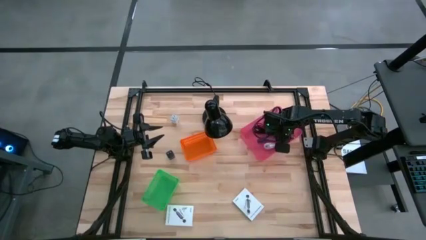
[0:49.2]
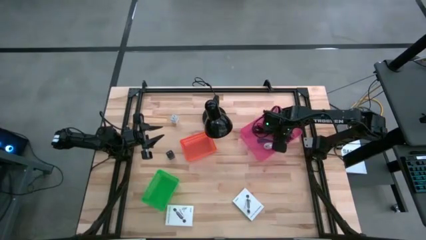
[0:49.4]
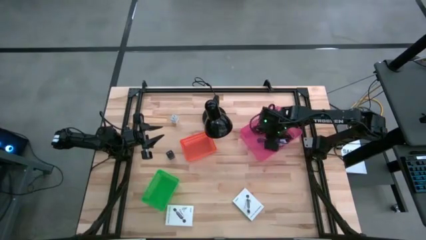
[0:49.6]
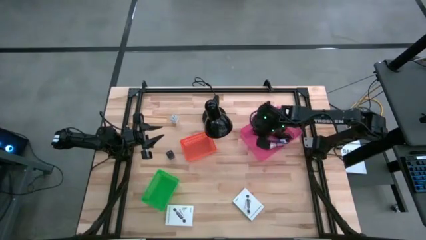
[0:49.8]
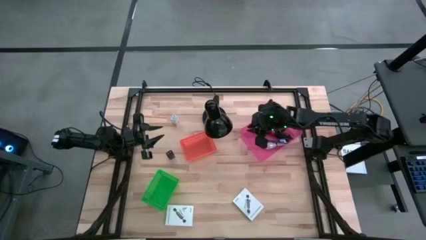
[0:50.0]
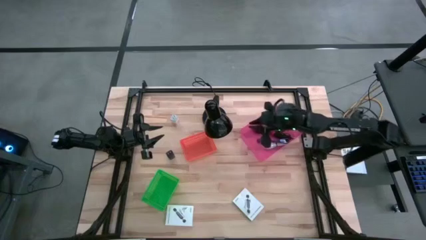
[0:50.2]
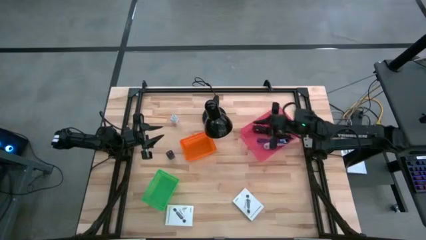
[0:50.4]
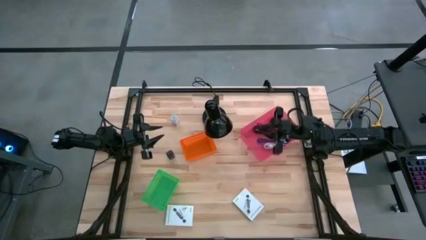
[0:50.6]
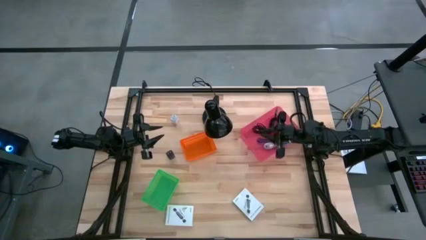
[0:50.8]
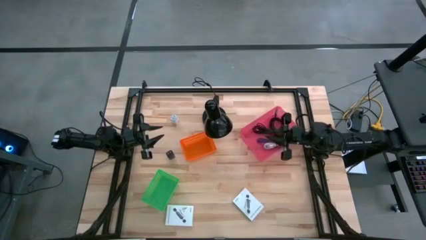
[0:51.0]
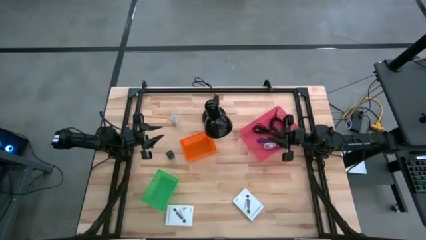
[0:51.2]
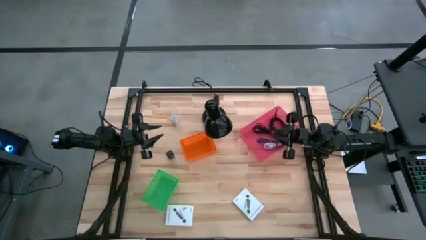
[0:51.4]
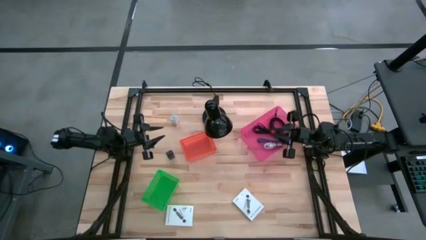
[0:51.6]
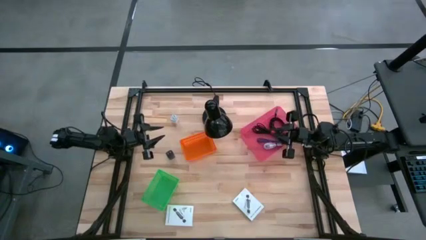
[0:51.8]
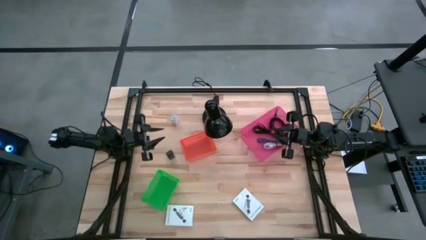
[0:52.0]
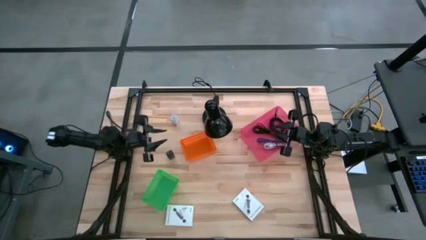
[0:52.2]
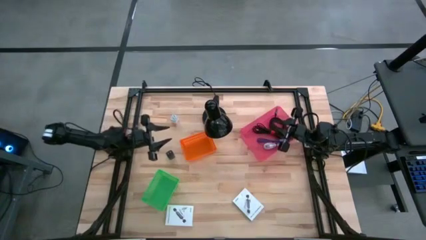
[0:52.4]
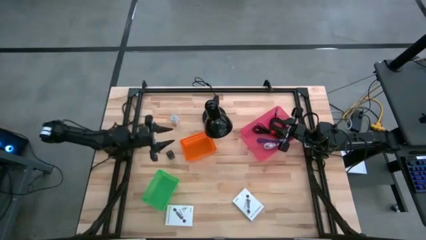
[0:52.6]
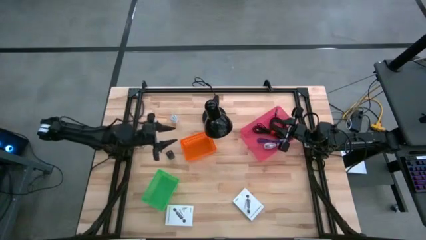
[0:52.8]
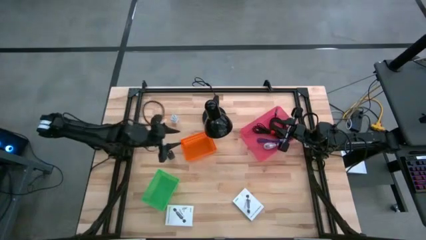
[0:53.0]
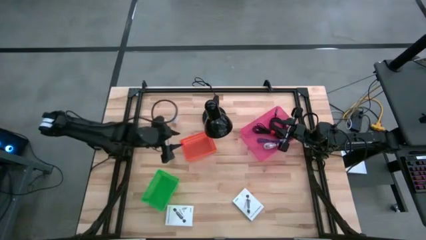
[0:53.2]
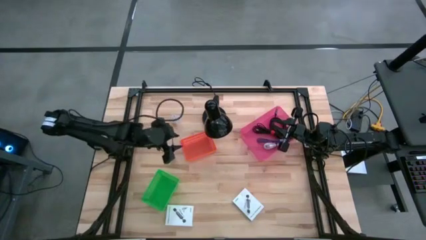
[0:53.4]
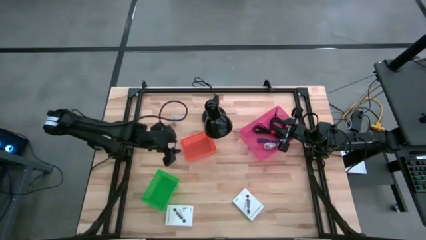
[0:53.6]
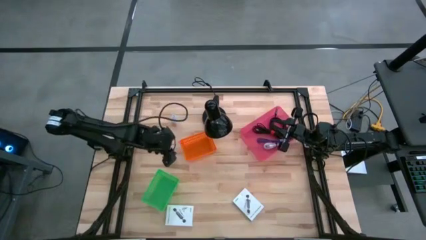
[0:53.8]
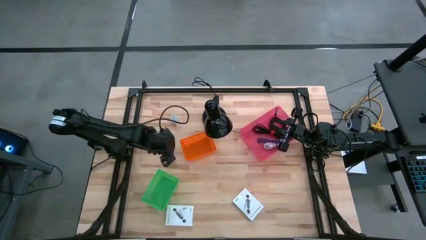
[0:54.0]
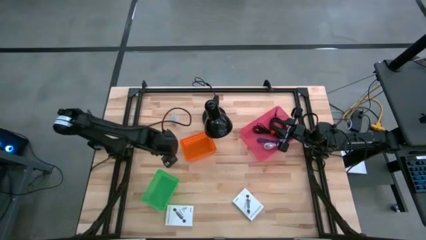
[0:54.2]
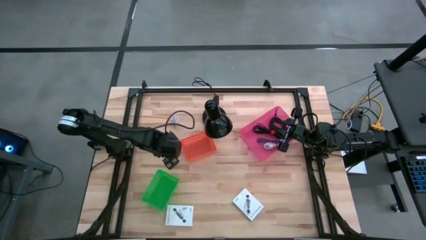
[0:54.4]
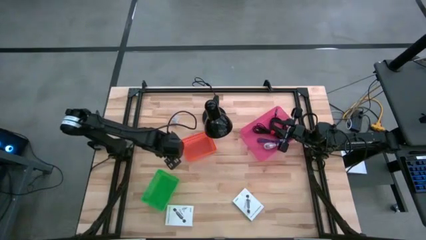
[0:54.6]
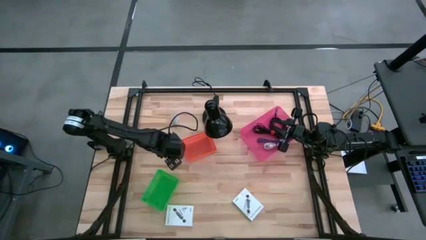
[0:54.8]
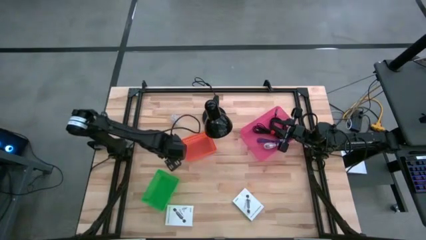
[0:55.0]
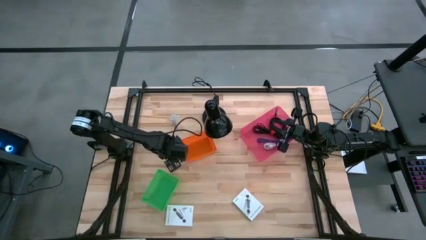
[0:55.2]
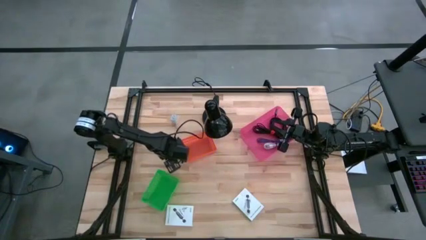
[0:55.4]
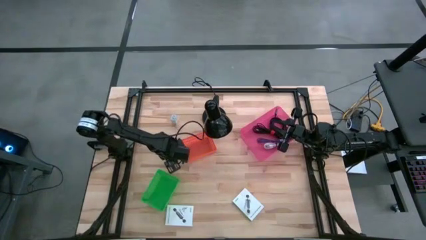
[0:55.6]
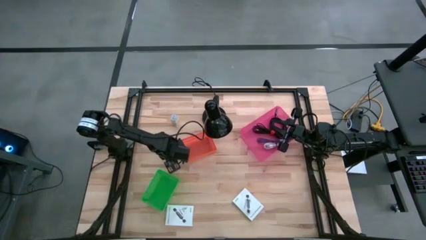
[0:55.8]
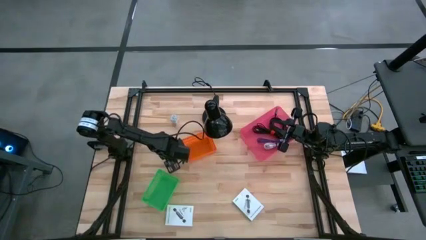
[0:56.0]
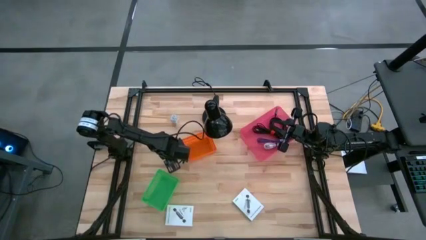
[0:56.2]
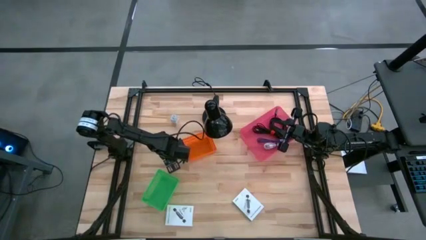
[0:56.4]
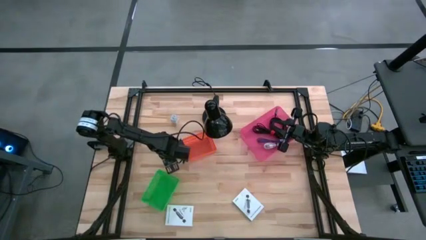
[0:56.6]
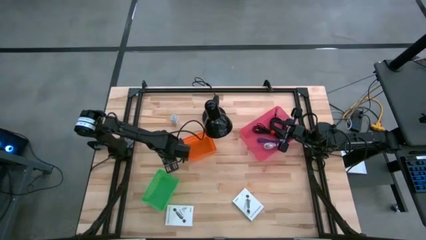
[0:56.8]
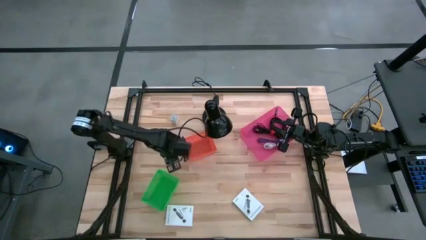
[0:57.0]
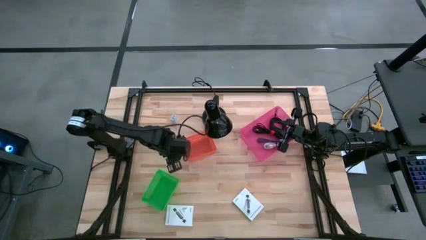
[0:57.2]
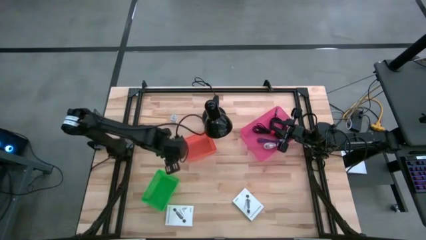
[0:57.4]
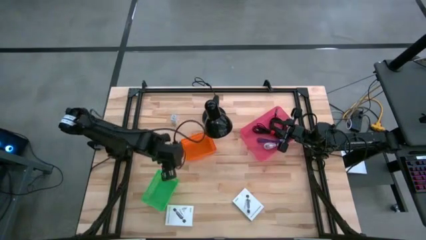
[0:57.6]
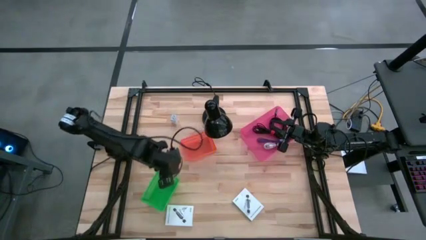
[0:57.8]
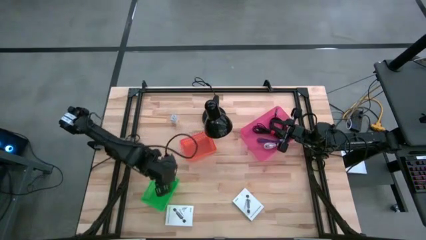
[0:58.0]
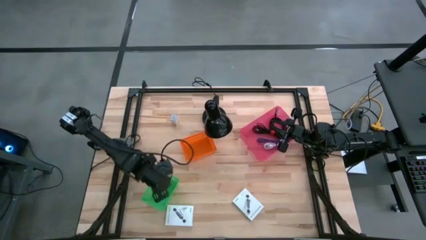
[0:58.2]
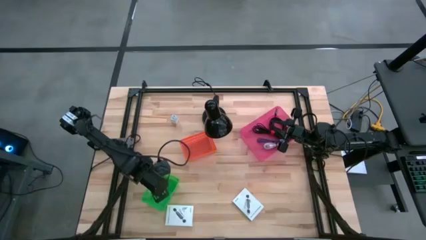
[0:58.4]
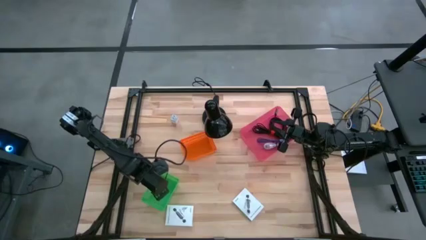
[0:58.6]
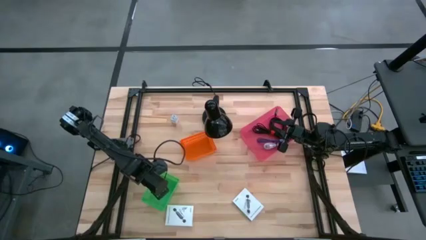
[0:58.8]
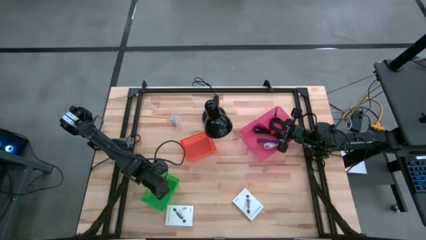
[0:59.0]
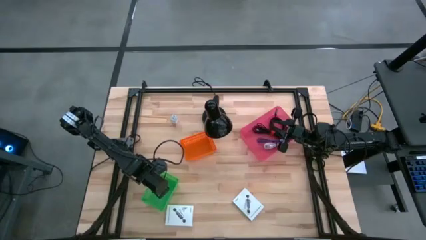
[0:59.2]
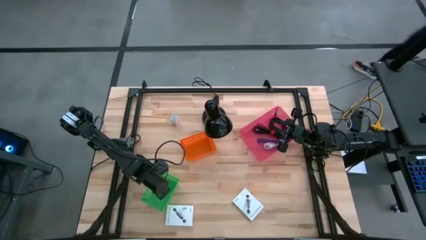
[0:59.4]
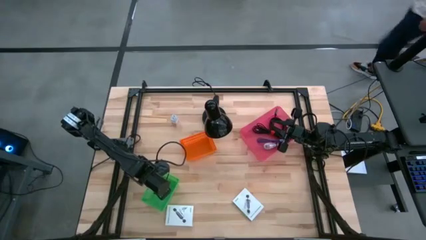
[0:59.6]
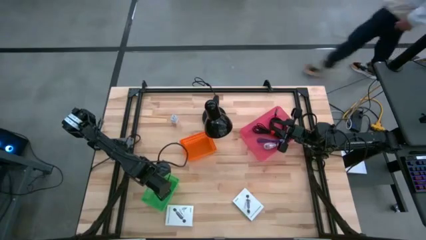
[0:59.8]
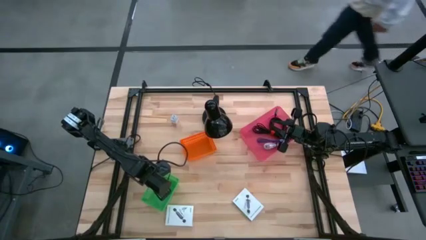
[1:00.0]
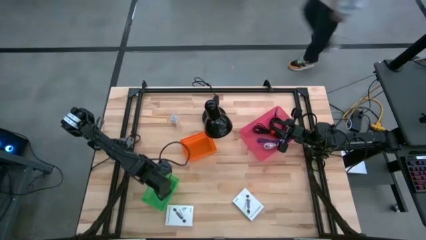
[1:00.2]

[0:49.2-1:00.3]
Task: Pick and place items into bin
Put the black charger adapter into the green bin

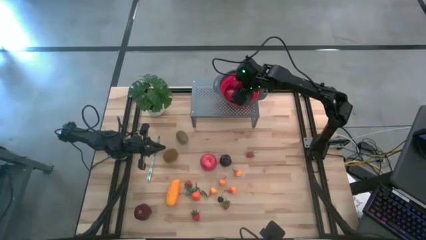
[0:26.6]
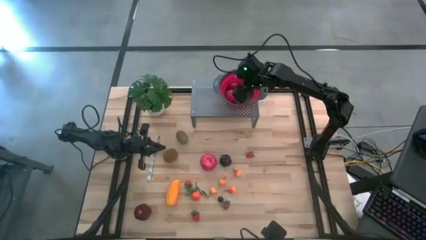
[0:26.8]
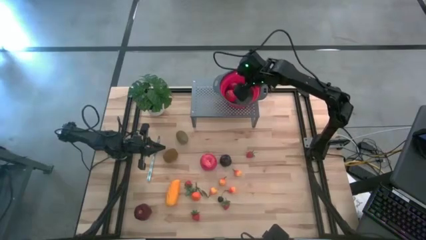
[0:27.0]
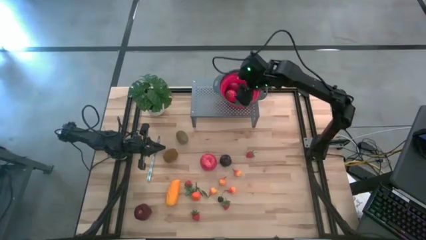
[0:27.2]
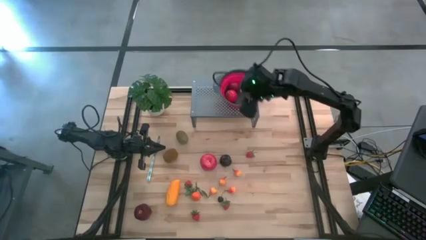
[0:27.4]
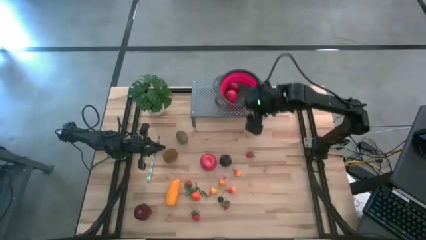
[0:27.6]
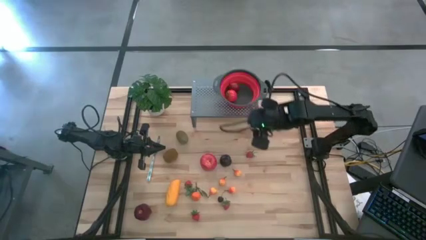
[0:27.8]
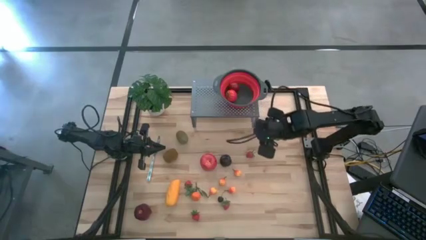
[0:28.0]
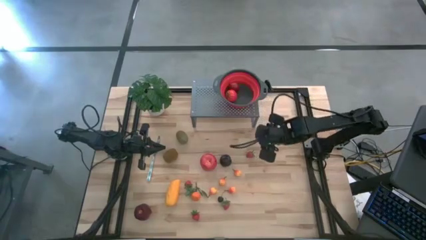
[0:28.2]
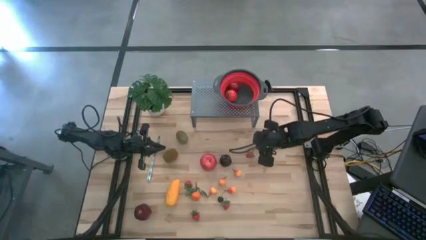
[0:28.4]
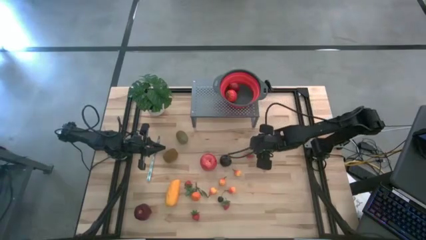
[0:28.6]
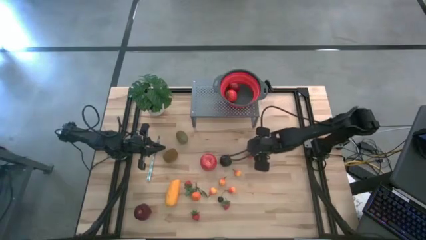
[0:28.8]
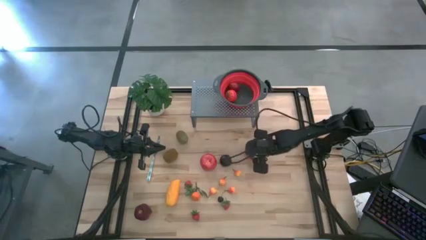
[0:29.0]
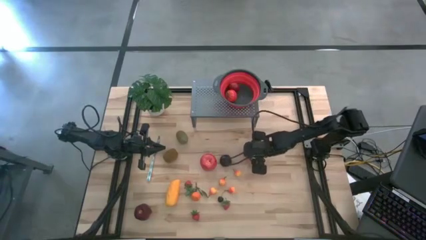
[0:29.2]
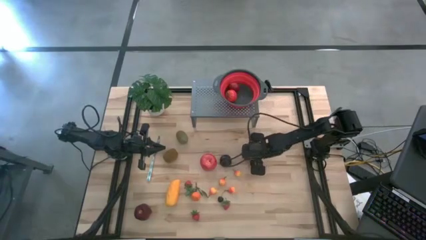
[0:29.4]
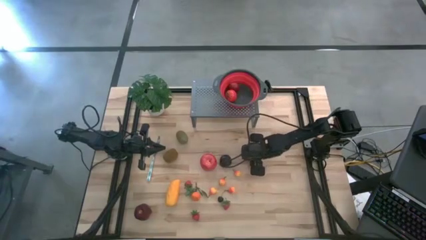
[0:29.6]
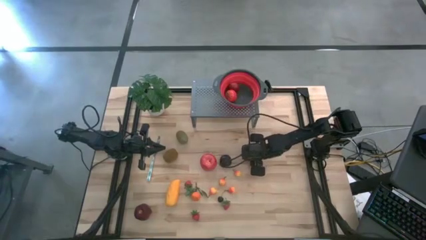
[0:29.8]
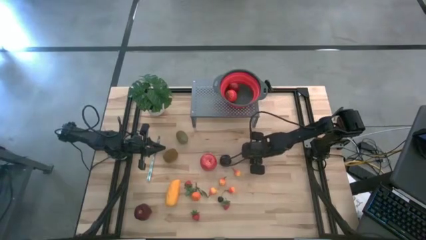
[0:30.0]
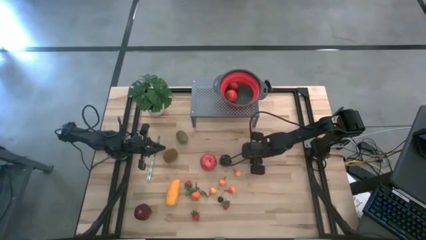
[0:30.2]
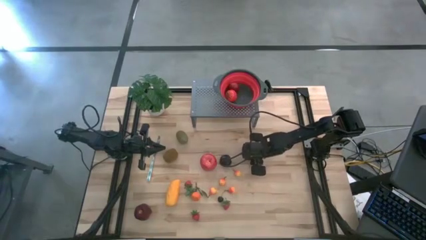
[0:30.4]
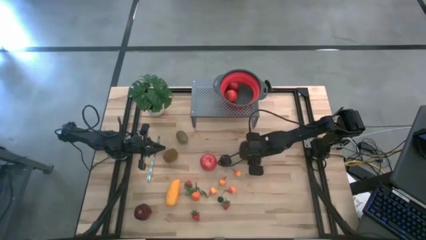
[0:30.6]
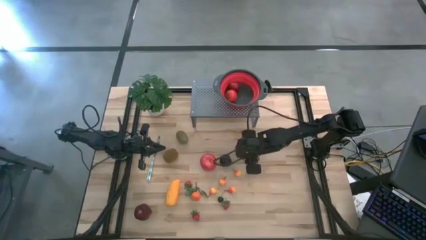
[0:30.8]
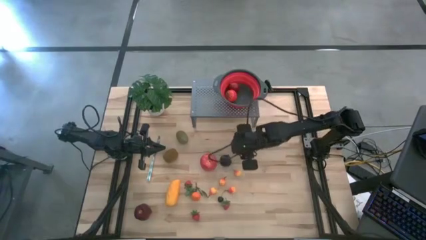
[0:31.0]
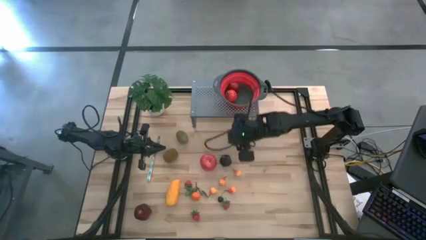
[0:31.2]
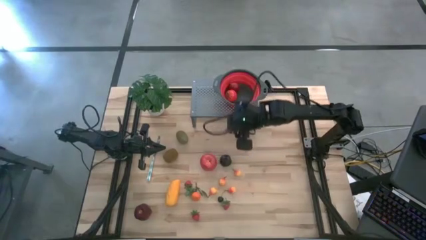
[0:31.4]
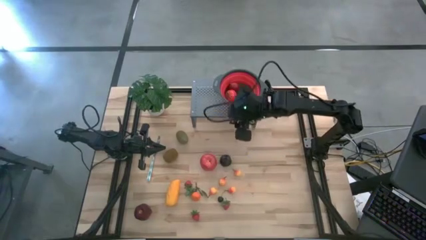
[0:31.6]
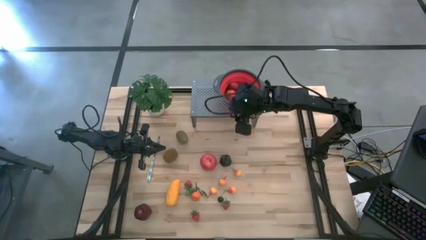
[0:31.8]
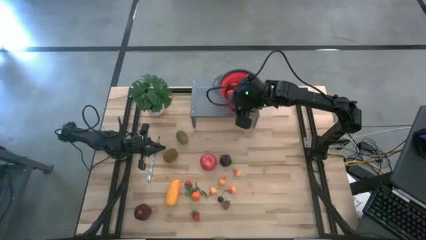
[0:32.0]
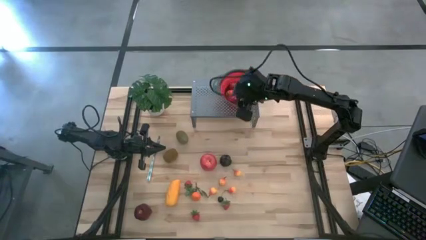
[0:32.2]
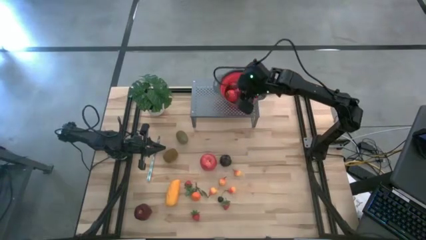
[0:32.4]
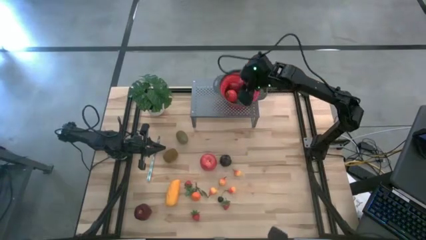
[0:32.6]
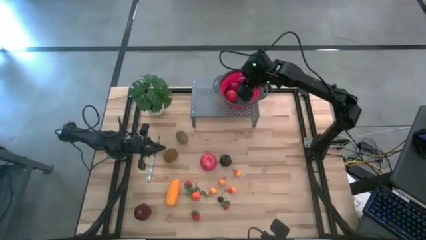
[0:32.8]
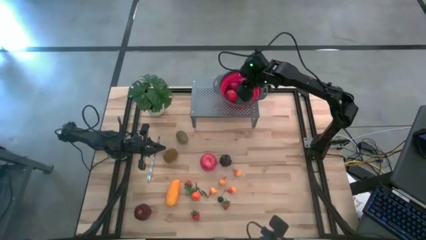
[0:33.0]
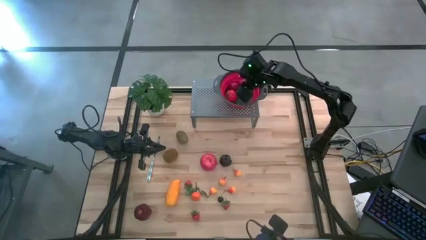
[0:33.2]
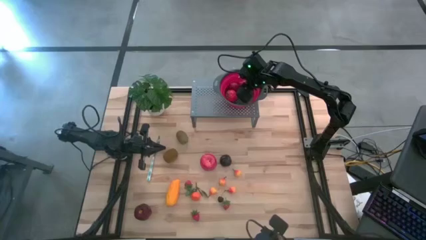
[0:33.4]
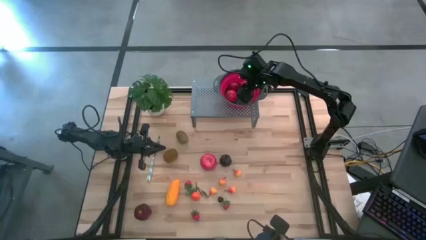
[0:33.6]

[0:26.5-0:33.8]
Task: Pick & Place Fruit
Put the strawberry into the strainer bowl on the shelf
